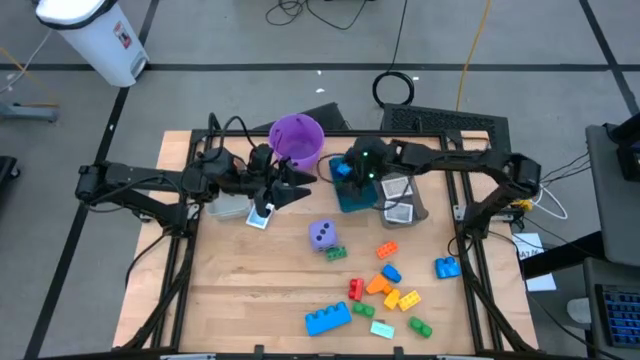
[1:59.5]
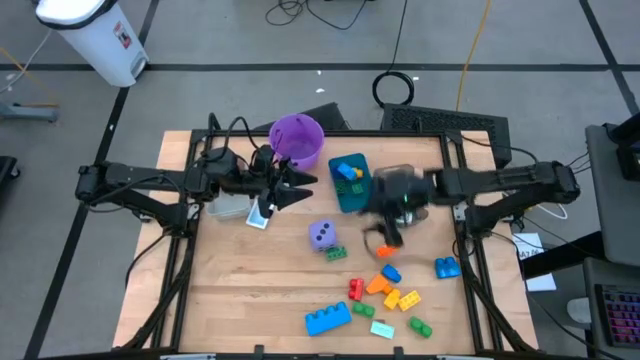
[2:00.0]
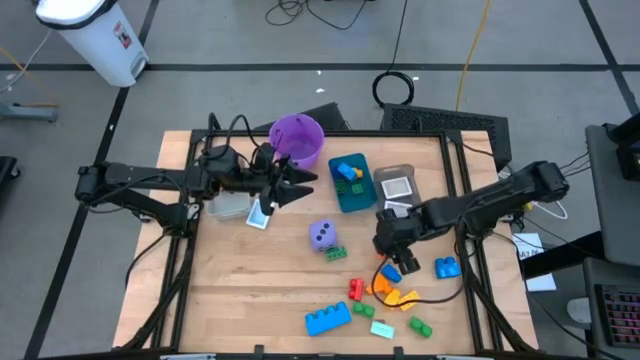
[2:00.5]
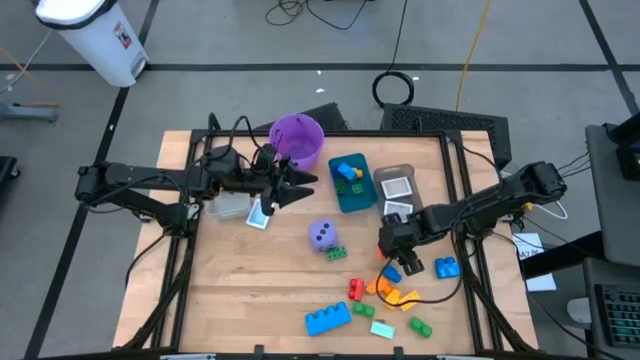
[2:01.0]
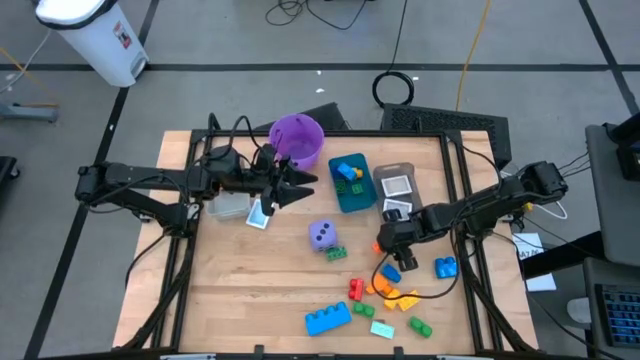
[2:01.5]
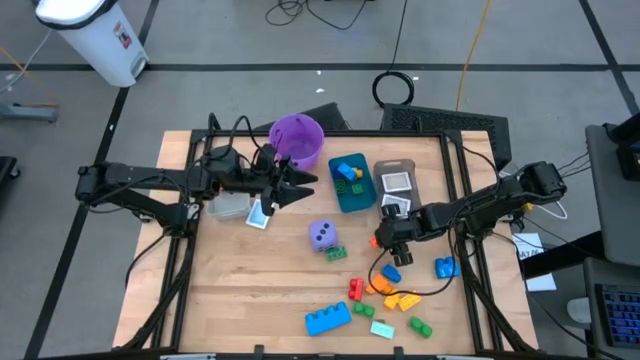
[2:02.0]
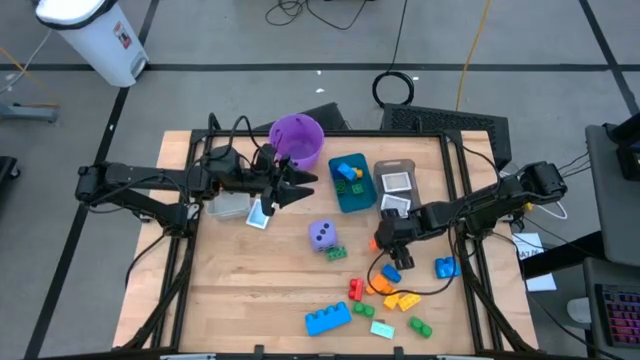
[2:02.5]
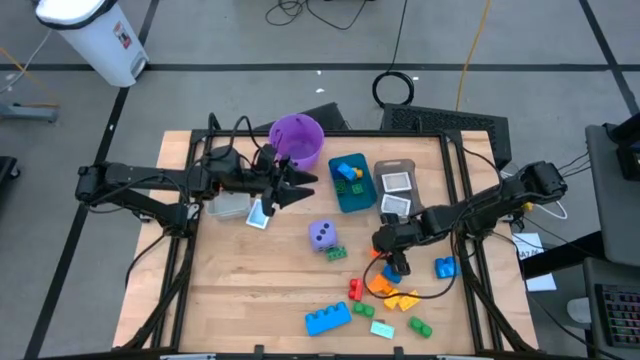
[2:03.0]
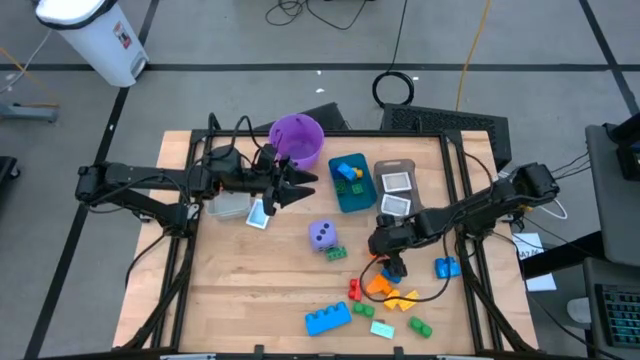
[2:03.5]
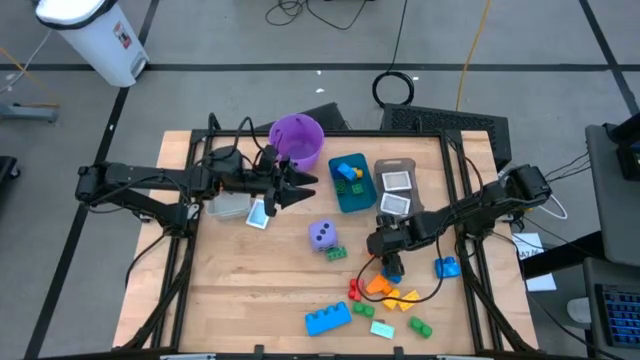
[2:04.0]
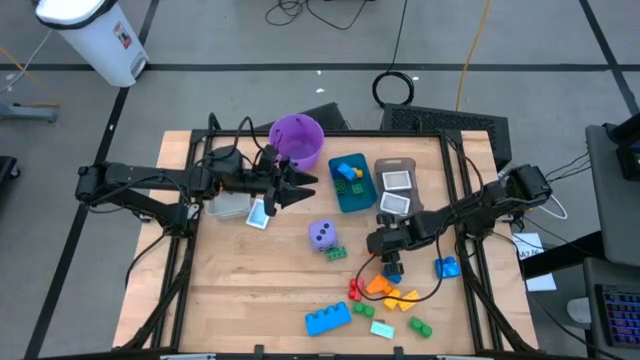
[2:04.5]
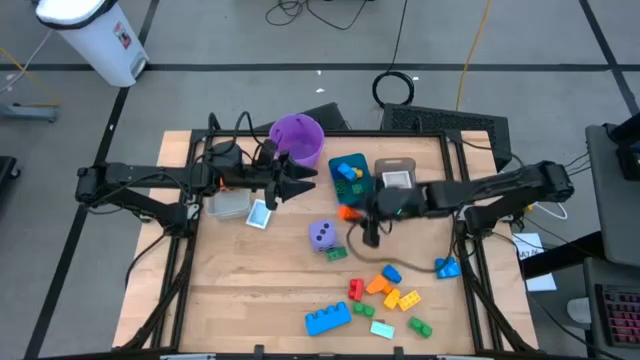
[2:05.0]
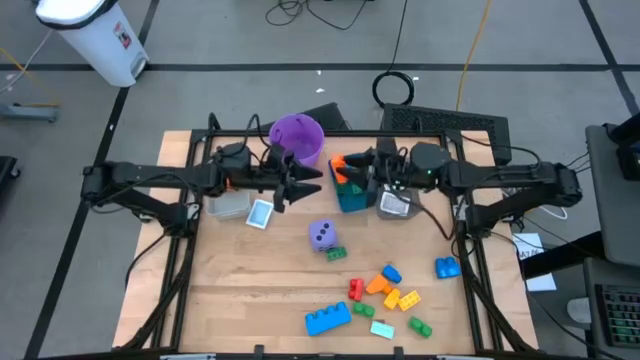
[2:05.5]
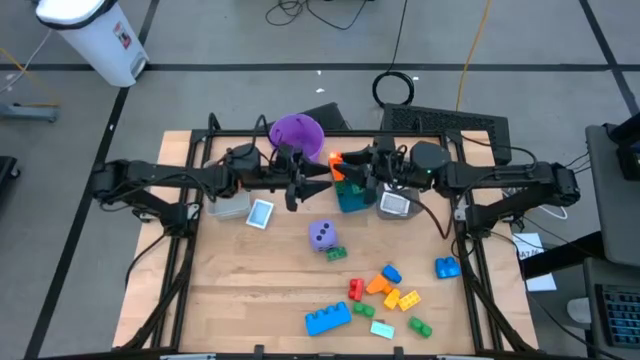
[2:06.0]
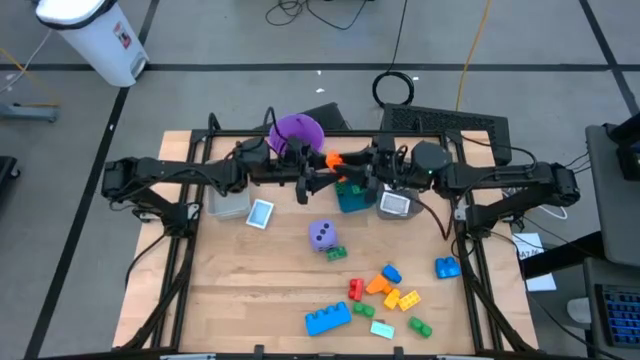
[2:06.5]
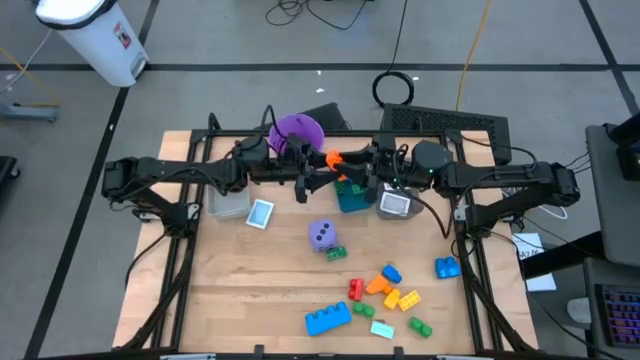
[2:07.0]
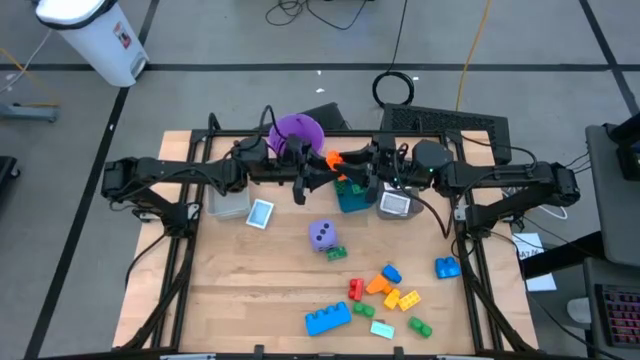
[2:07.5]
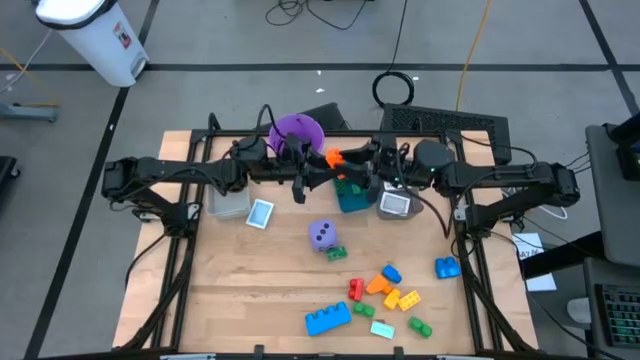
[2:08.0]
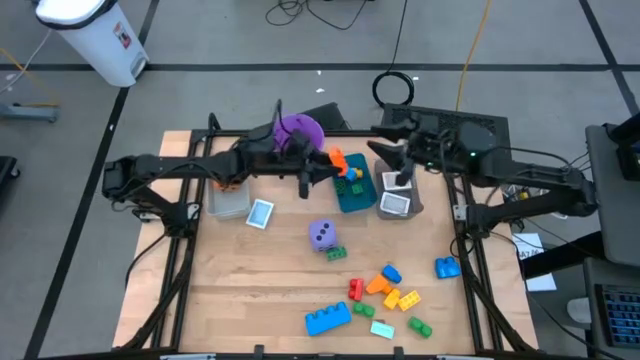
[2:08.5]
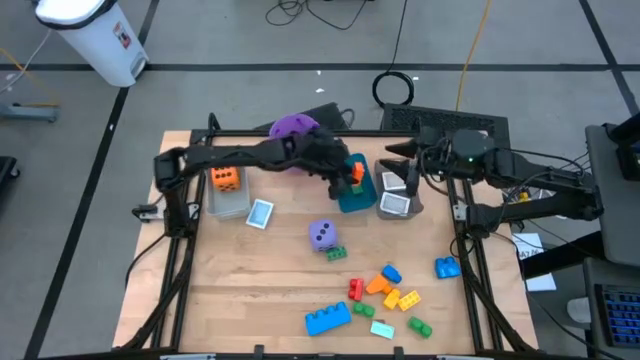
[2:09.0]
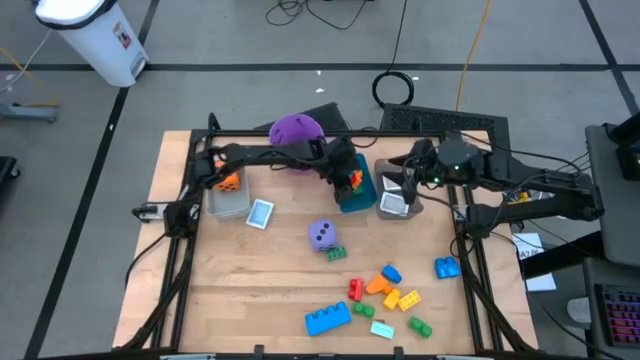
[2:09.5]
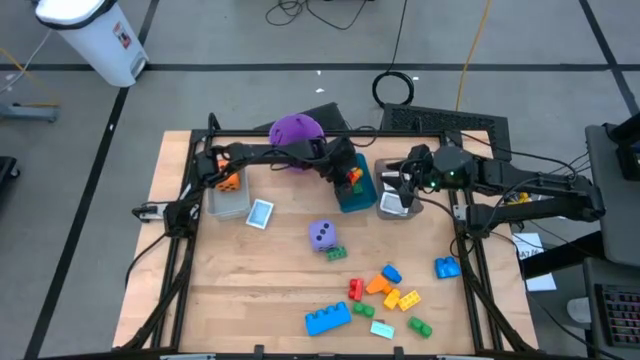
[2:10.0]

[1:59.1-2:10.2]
Task: Pick & Place Toys
Put the orange game piece into the blue bin

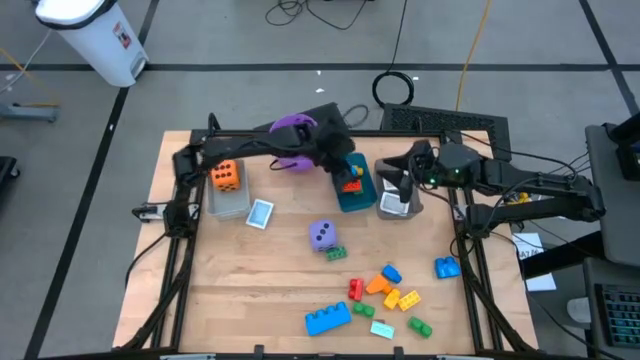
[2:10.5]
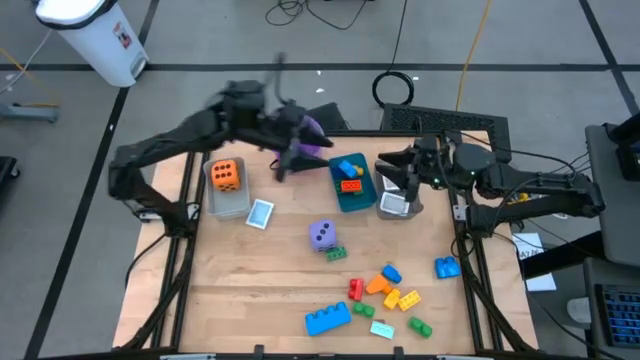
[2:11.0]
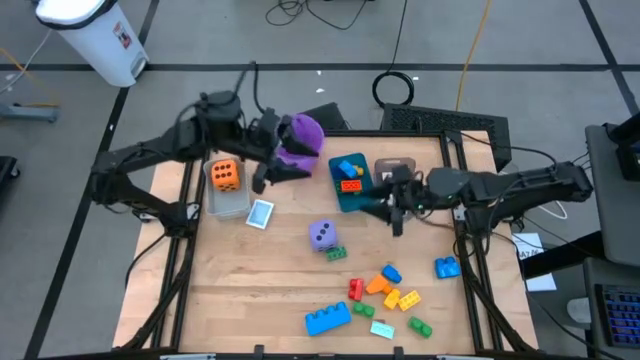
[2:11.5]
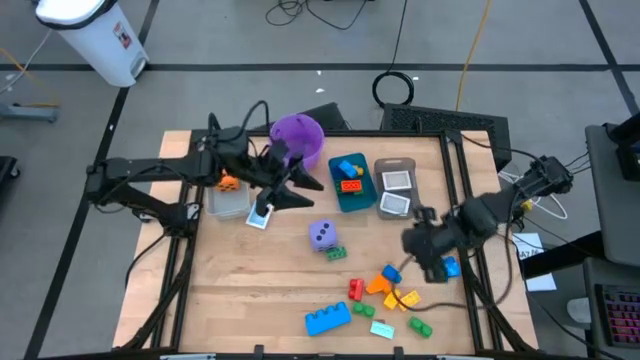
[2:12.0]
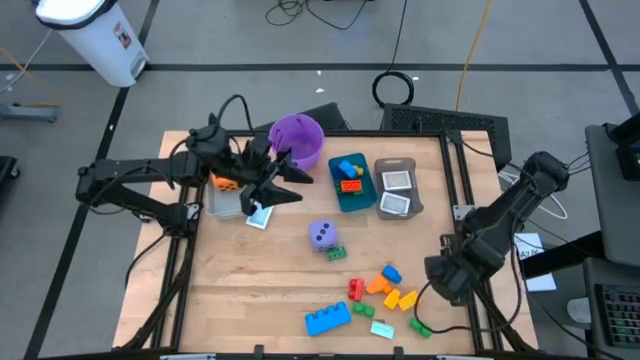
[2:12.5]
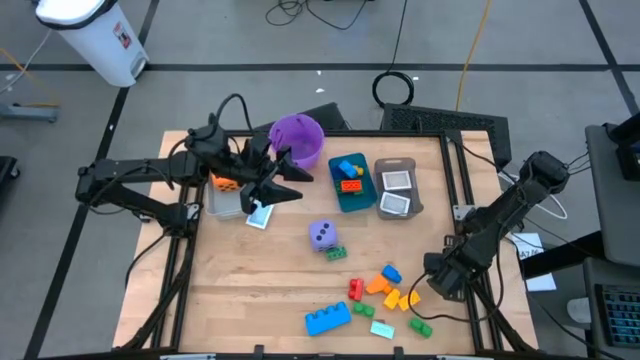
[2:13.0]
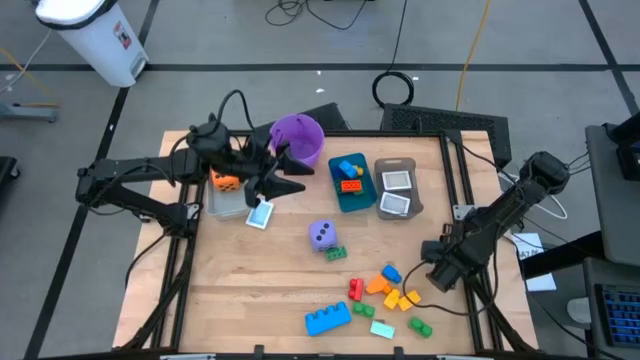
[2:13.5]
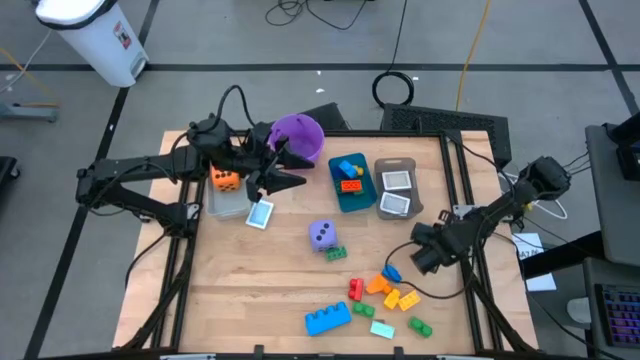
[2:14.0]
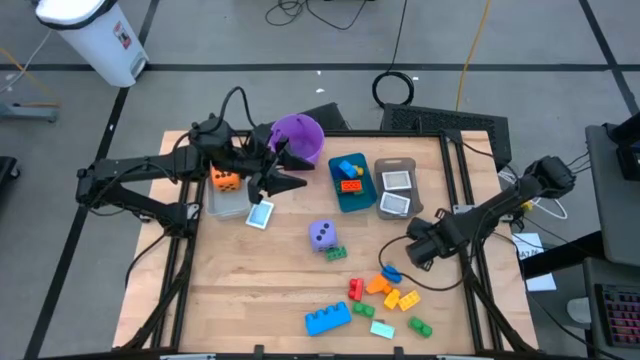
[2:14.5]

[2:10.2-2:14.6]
Put the blue game piece into the blue bin
